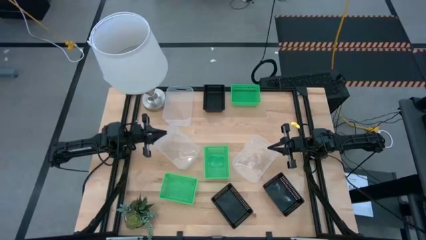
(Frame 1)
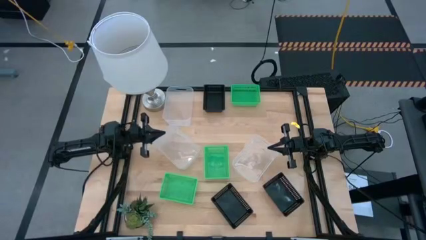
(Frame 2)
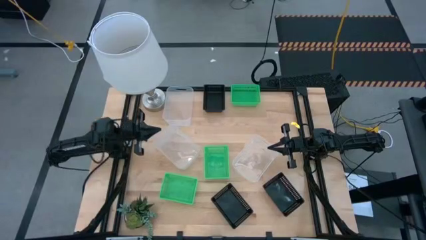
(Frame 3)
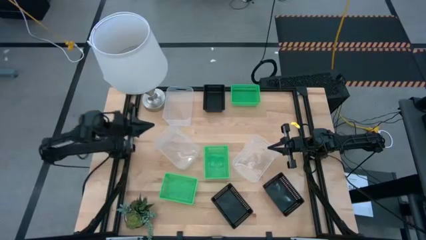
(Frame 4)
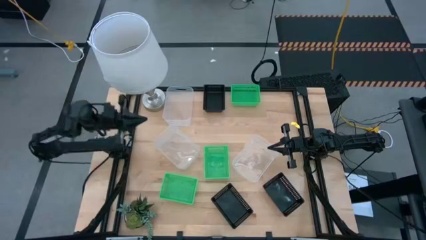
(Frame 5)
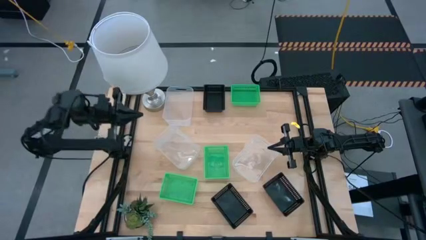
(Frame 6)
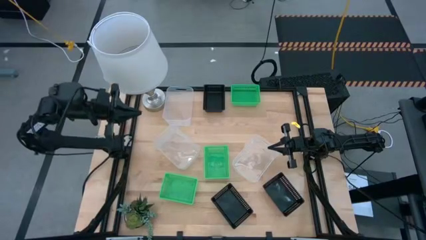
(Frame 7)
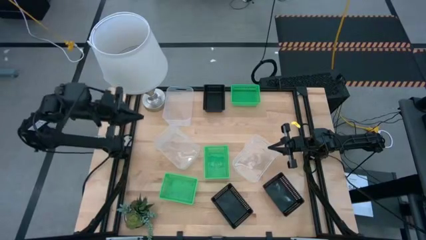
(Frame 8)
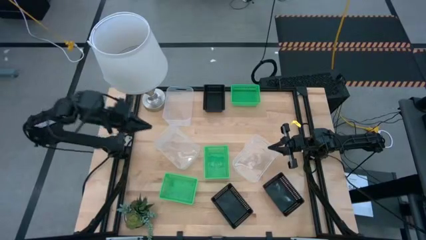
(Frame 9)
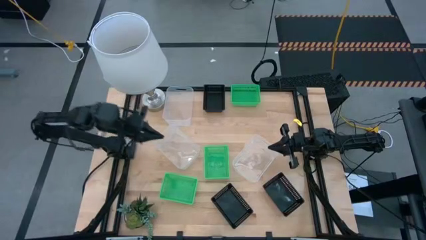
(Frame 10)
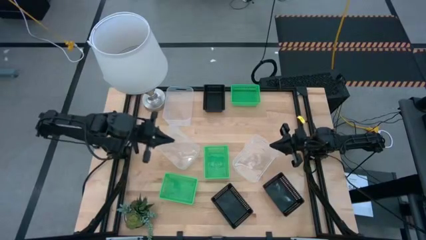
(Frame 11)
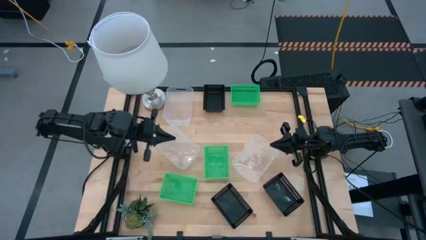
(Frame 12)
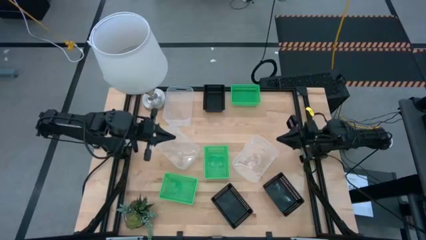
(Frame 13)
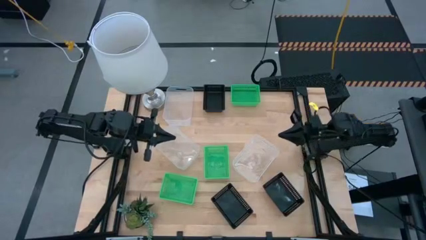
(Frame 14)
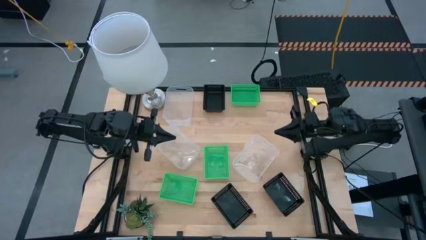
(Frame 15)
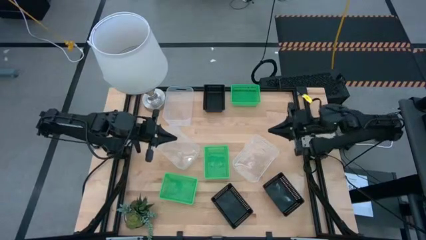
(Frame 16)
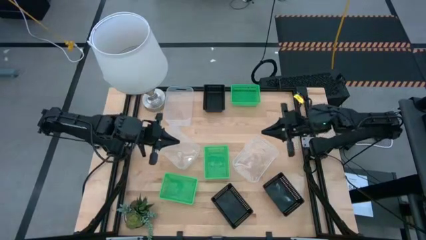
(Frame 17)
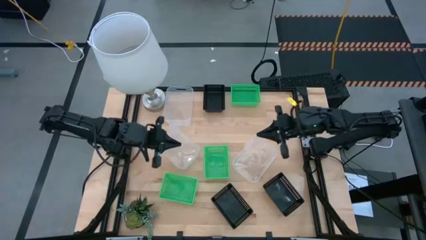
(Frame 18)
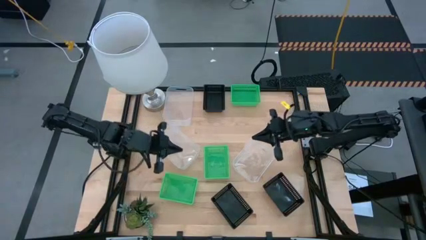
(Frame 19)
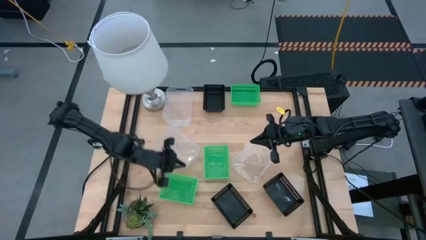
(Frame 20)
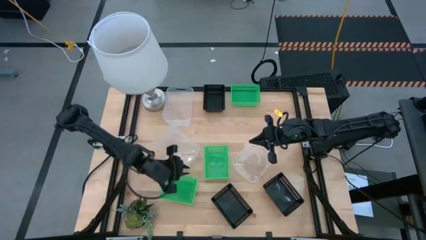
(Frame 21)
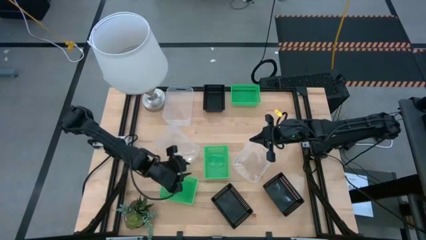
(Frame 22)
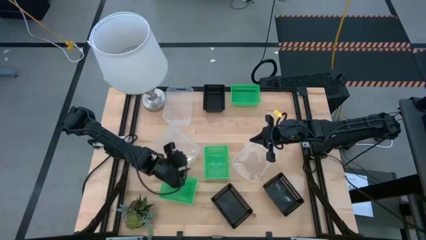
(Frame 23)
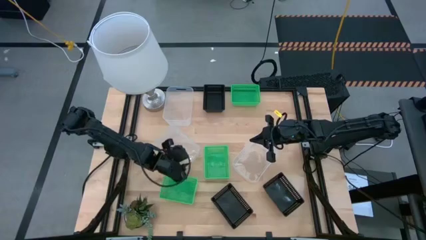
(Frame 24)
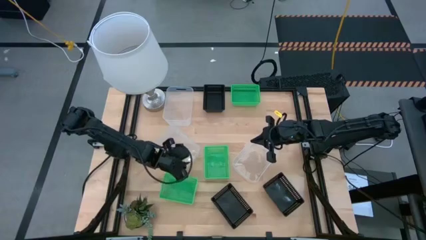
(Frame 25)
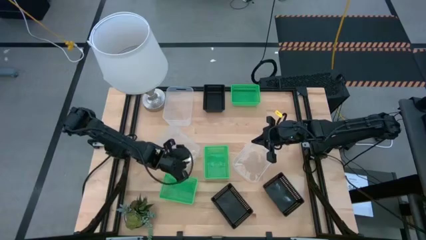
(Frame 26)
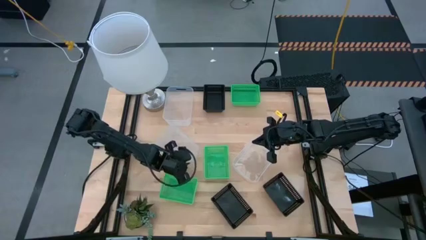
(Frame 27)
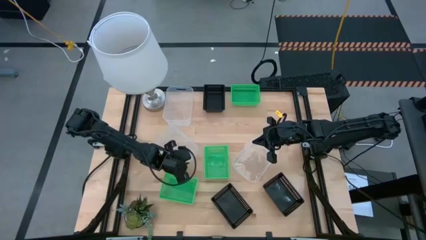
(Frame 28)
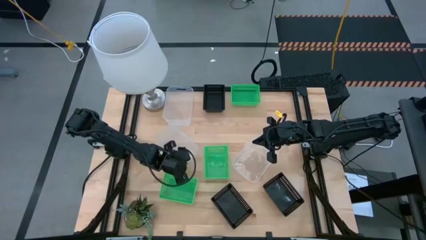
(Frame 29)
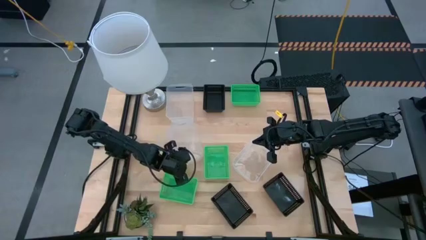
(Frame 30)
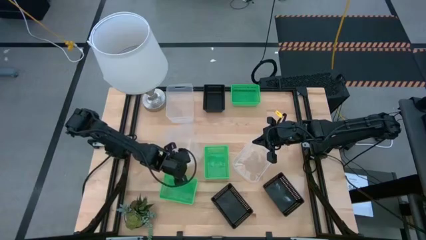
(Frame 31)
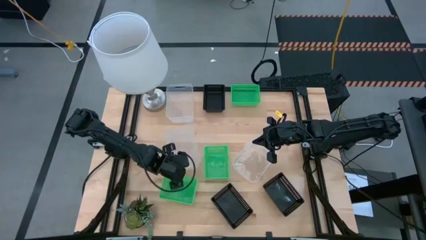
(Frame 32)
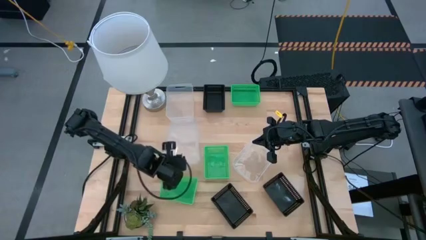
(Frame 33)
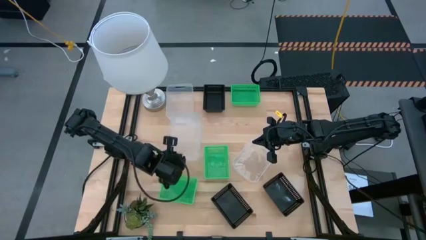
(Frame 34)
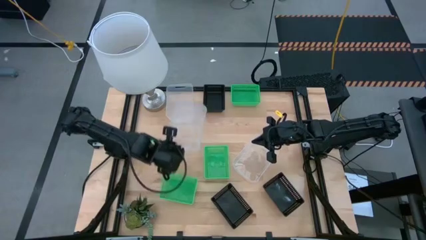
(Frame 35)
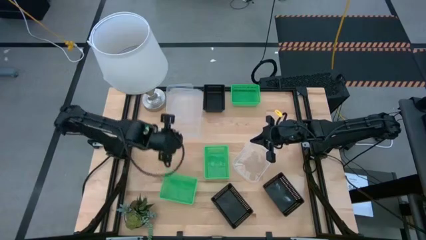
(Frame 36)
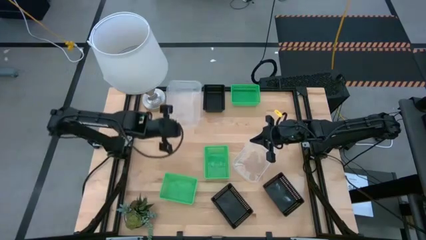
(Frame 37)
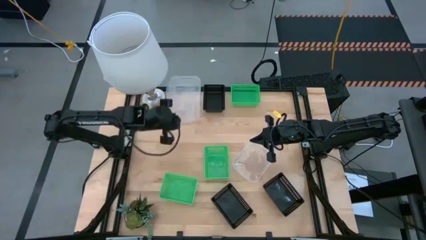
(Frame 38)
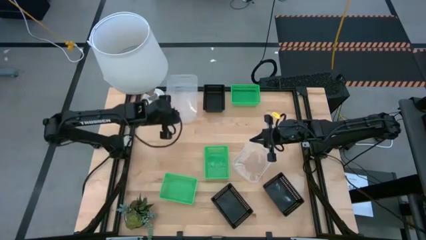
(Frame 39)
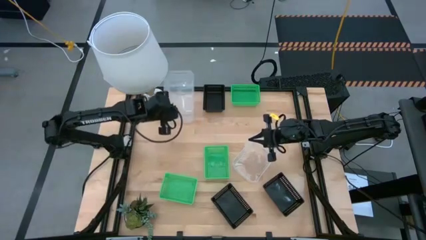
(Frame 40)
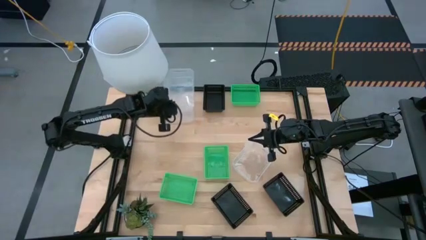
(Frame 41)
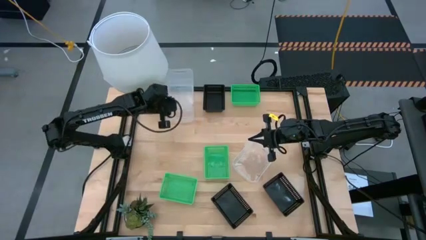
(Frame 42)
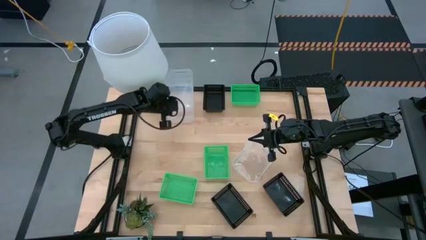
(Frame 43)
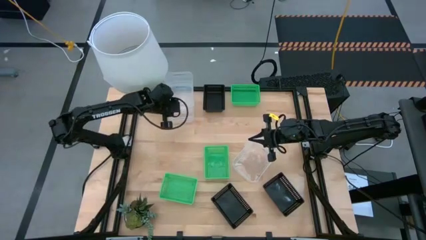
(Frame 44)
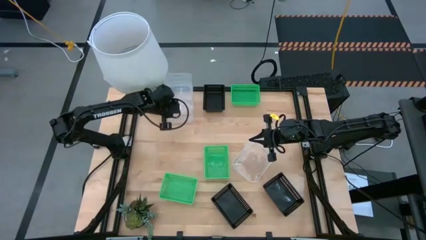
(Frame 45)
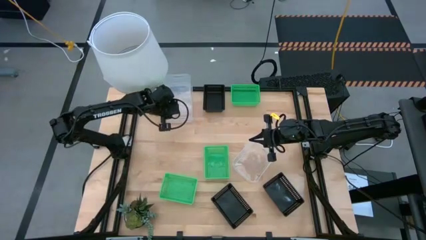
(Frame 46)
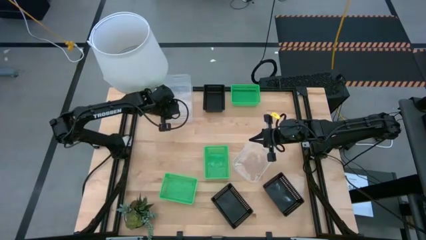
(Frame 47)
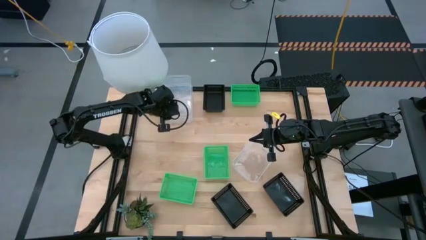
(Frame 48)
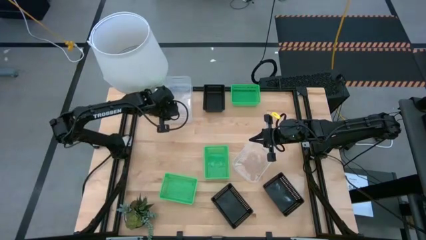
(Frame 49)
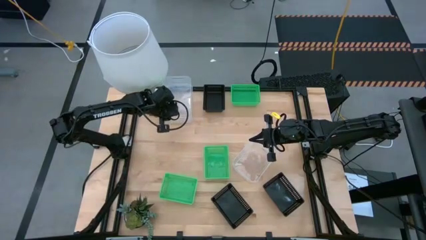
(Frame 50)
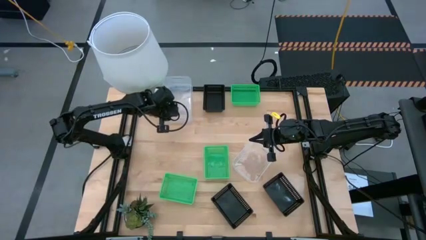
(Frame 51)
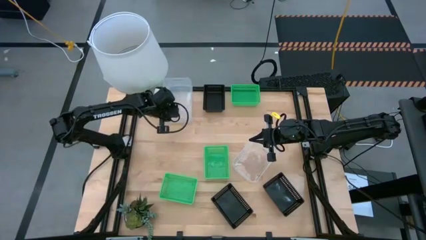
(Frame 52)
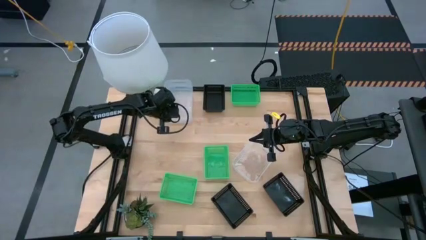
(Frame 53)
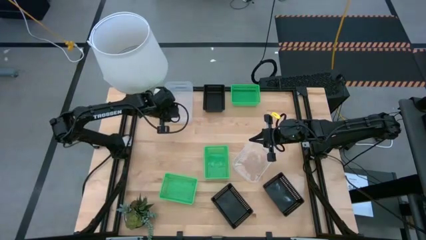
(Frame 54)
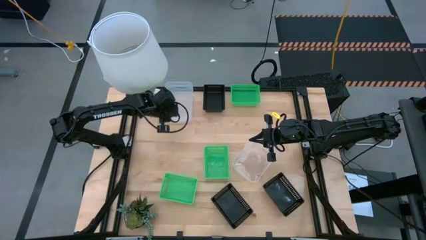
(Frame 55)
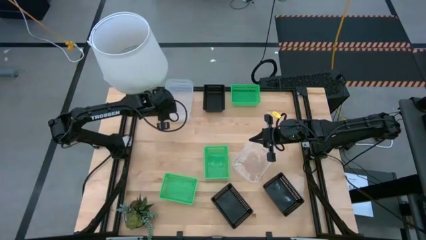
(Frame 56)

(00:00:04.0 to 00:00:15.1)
Stack the bottom left transparent bin on the top transparent bin

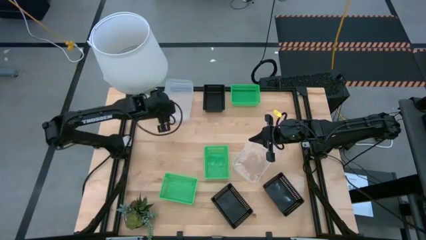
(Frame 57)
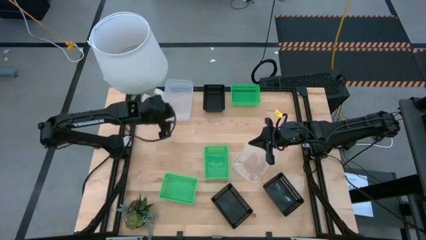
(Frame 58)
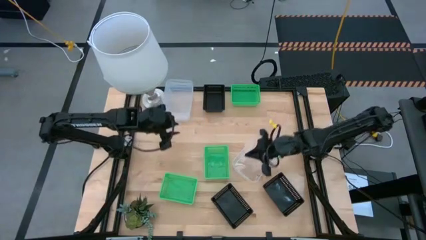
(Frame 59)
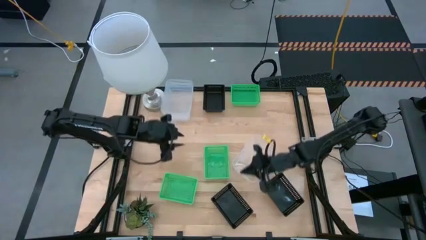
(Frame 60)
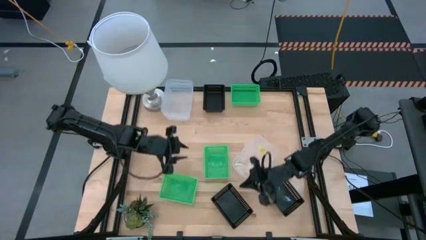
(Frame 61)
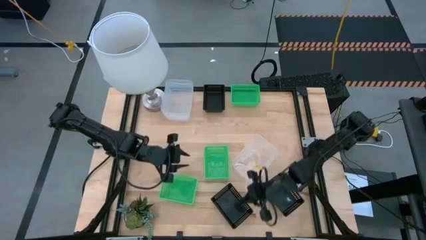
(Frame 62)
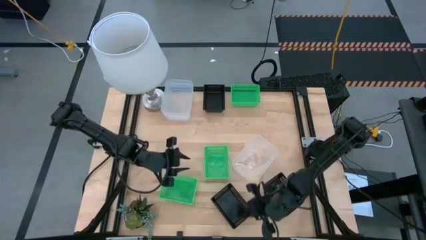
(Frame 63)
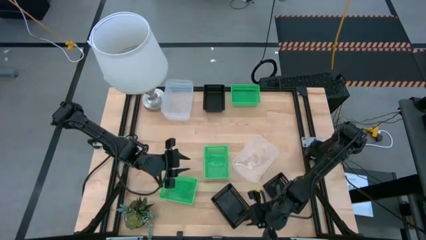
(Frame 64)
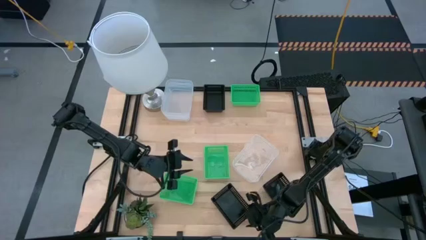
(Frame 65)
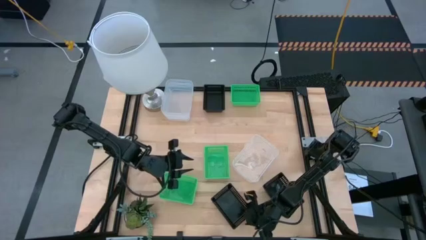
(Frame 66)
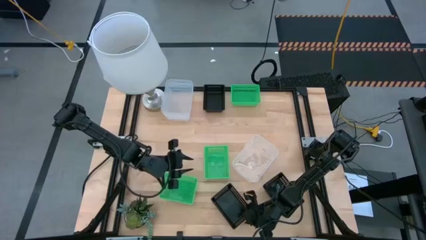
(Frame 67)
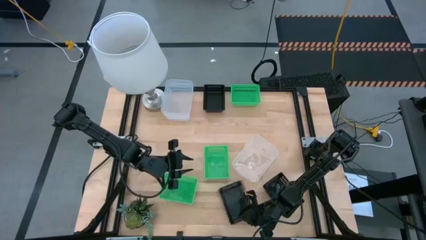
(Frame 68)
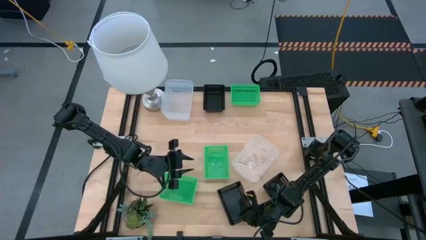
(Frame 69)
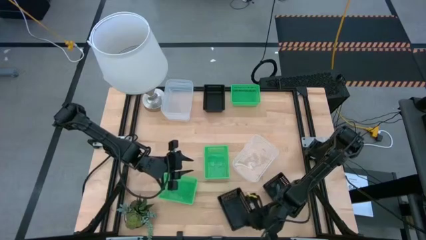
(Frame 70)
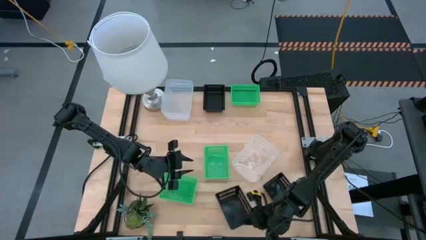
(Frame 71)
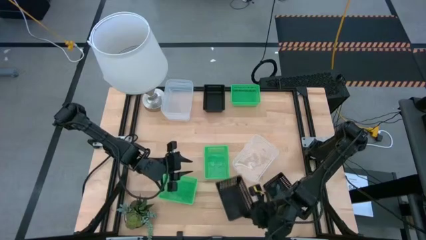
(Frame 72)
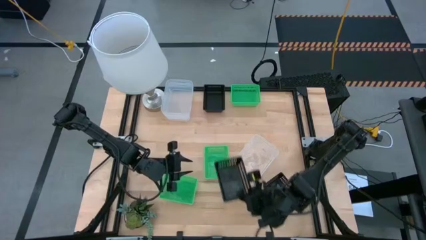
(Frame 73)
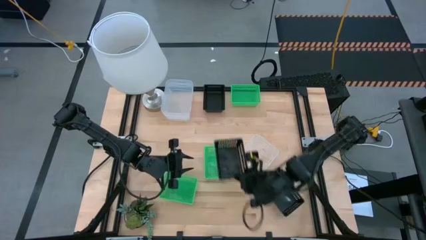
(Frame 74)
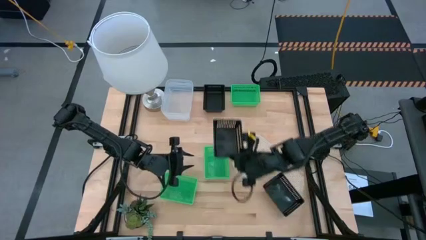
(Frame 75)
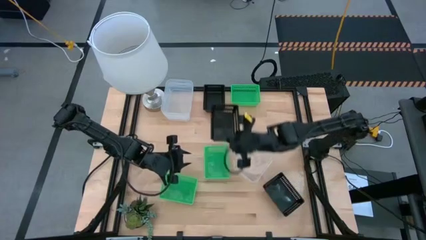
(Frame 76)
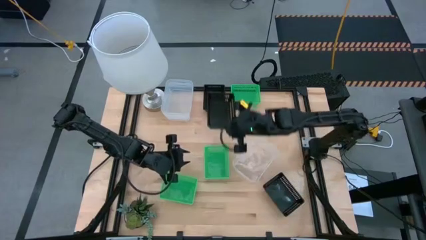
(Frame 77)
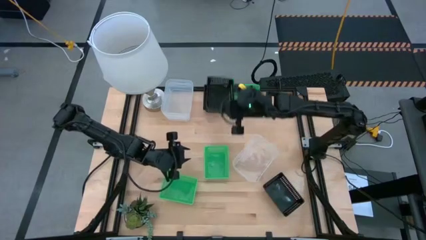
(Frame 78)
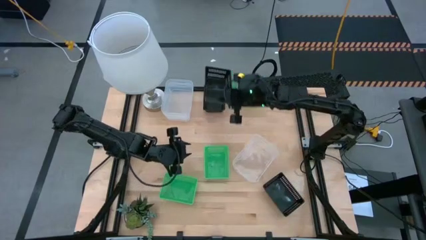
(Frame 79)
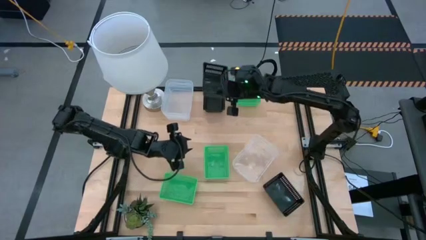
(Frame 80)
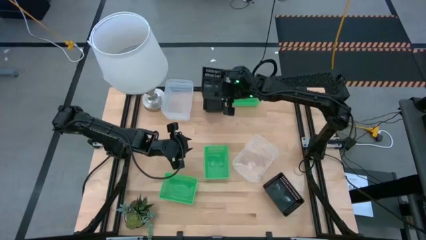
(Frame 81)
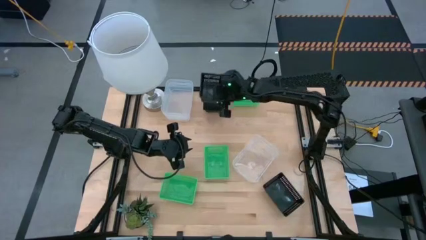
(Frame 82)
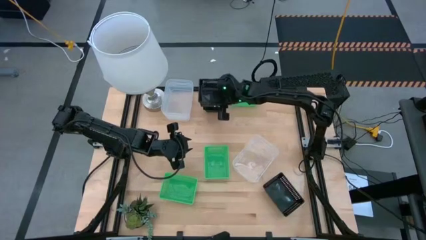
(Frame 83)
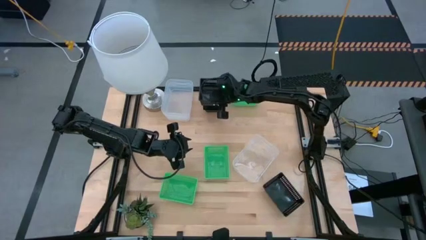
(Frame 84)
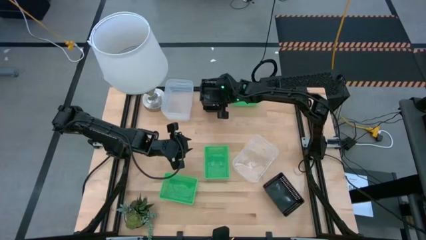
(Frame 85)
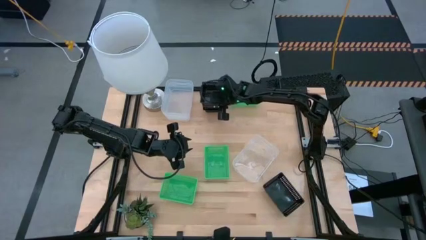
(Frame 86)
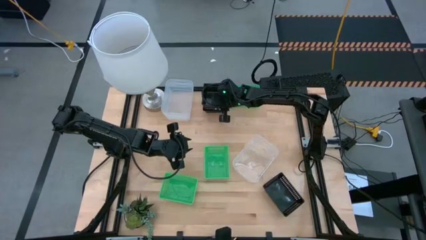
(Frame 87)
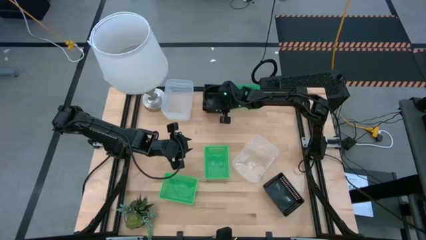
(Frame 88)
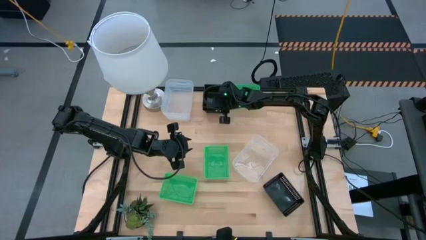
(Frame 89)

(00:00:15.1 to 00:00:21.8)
Stack the bottom left black bin on the top black bin
